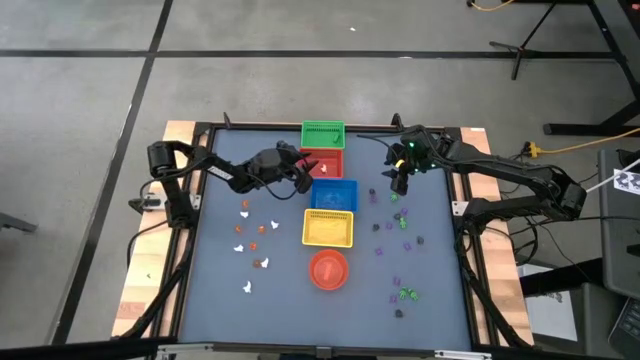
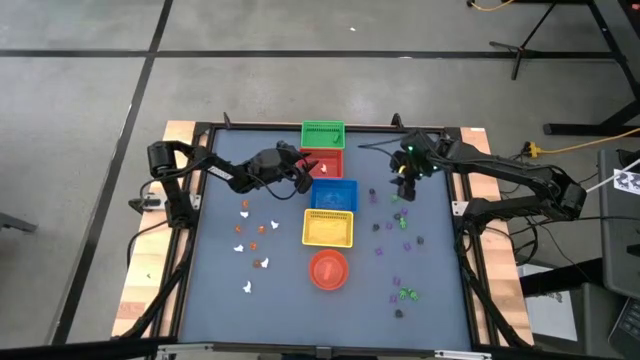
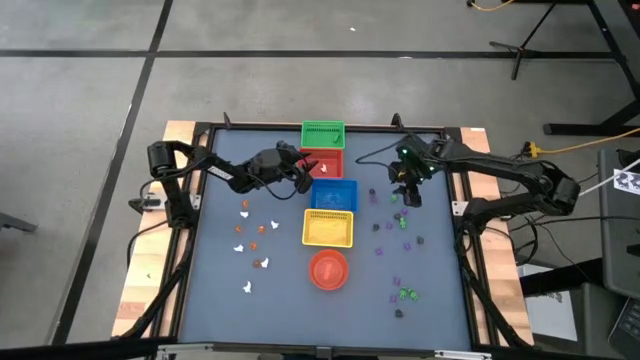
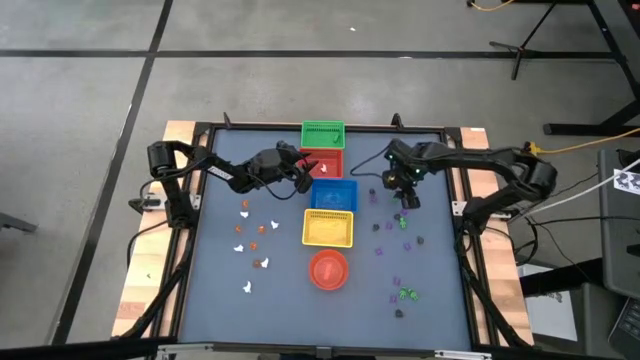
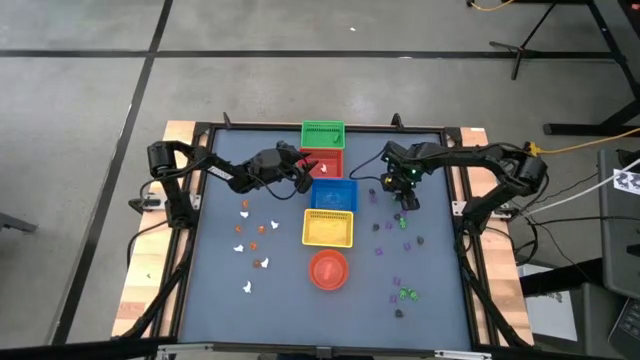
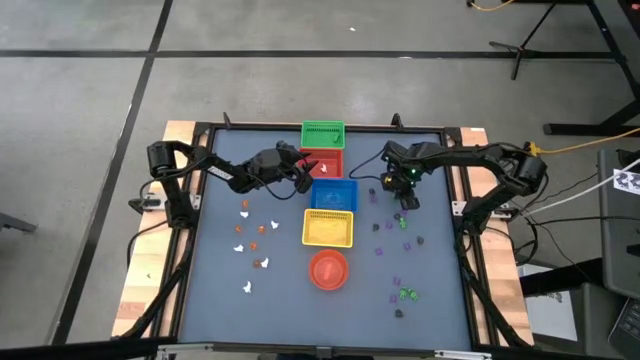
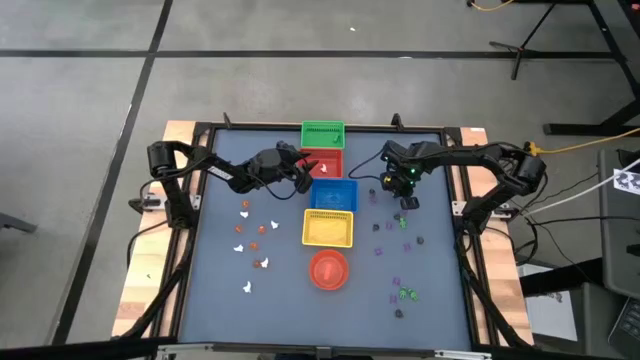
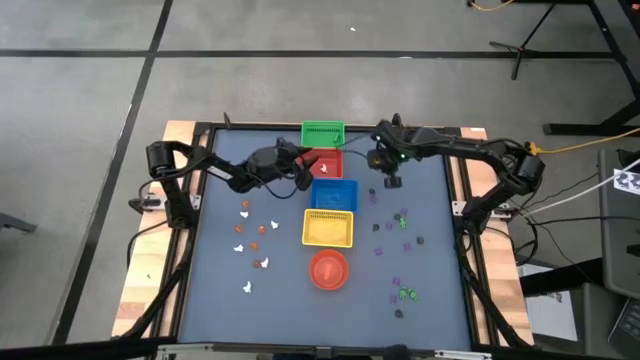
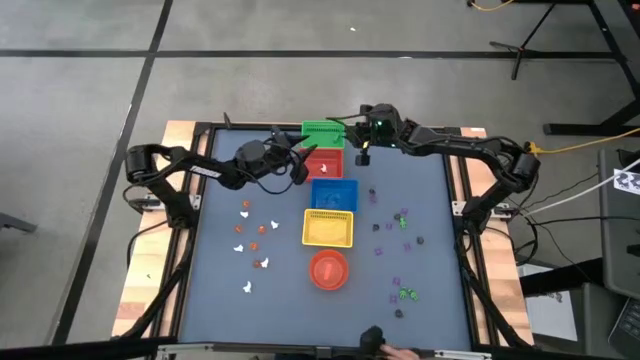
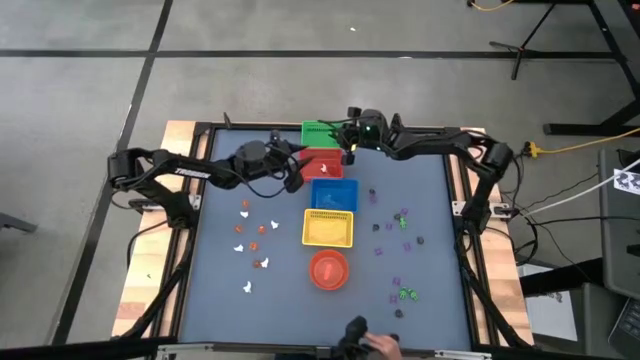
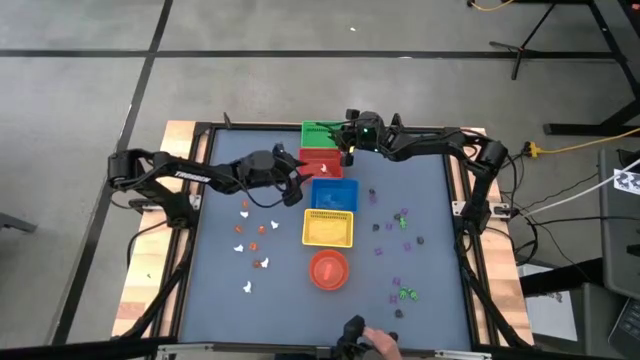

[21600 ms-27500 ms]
Task: Sort Halloween decoration
Put the green skeleton toy into the green bin

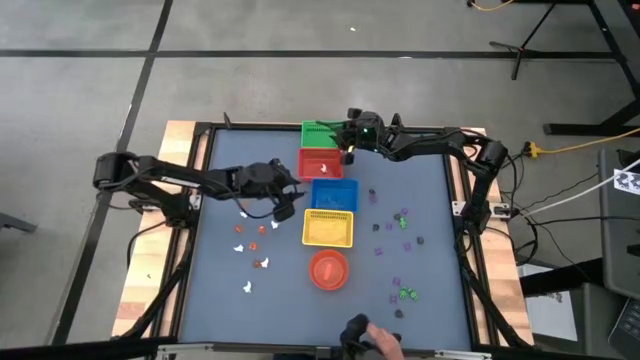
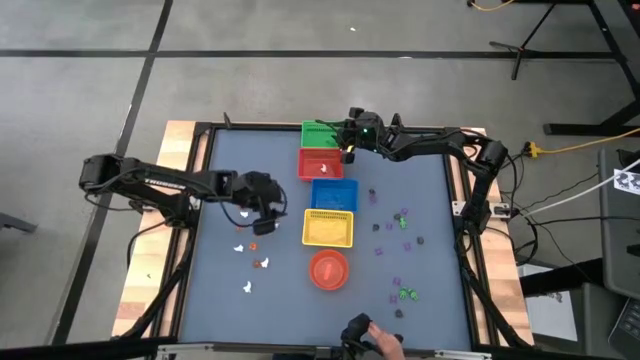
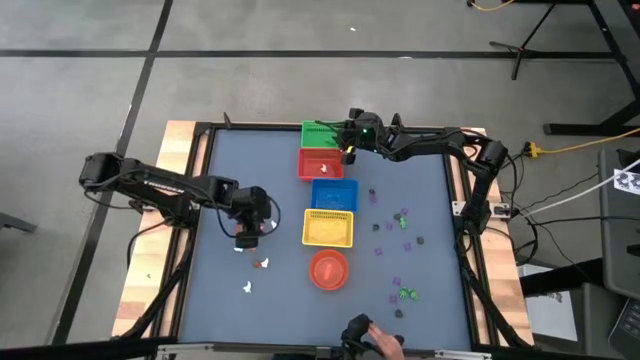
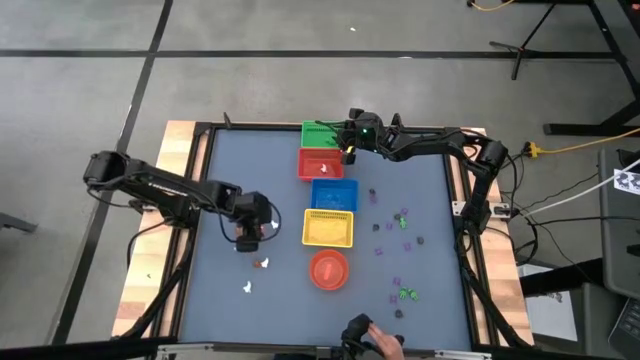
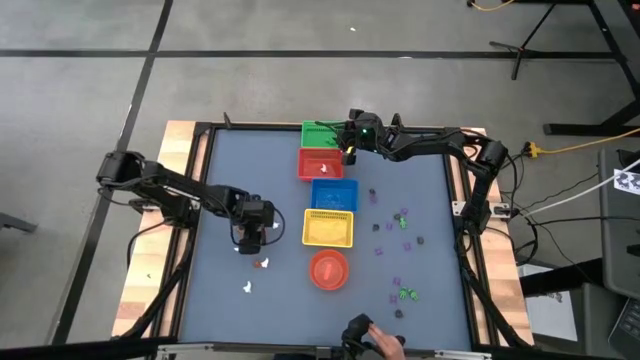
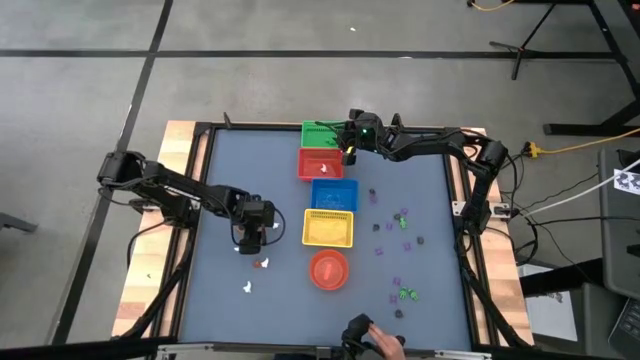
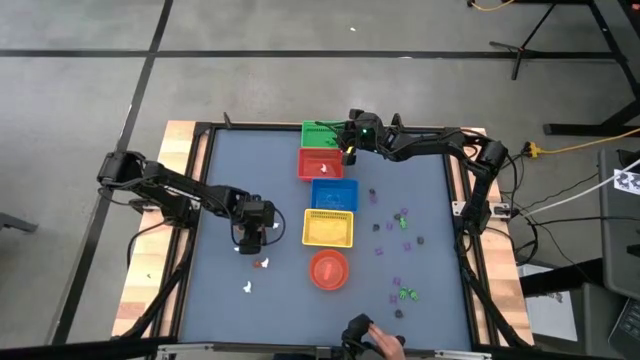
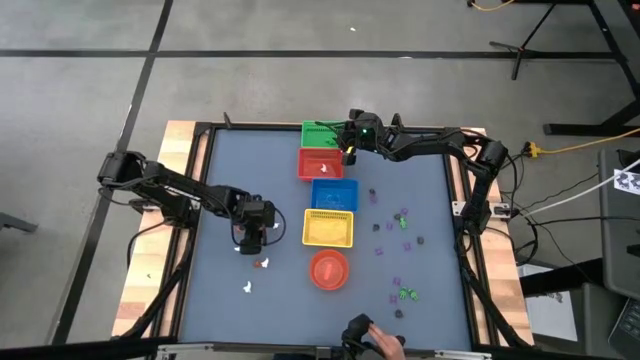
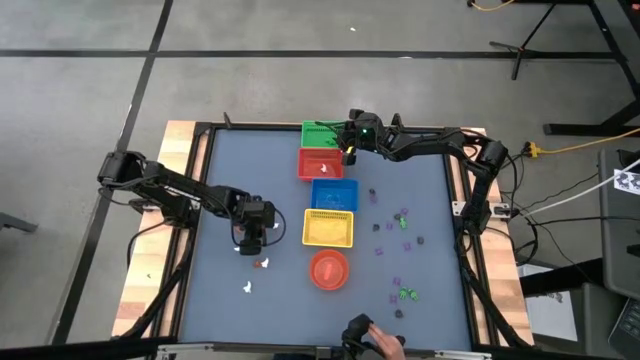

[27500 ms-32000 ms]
Put the orange pumpkin toy into the yellow bin

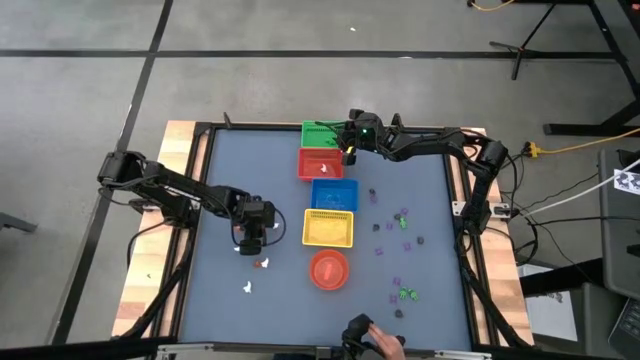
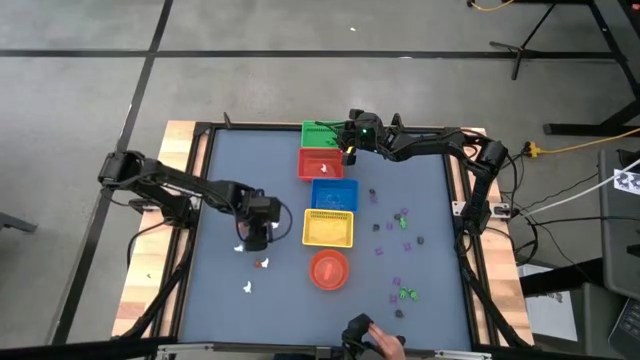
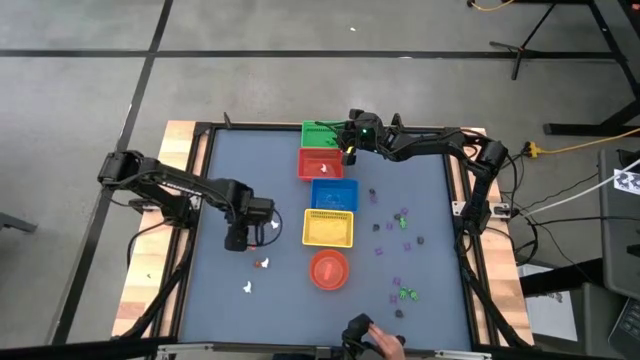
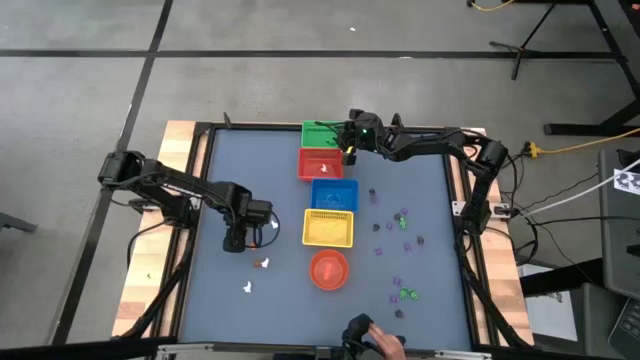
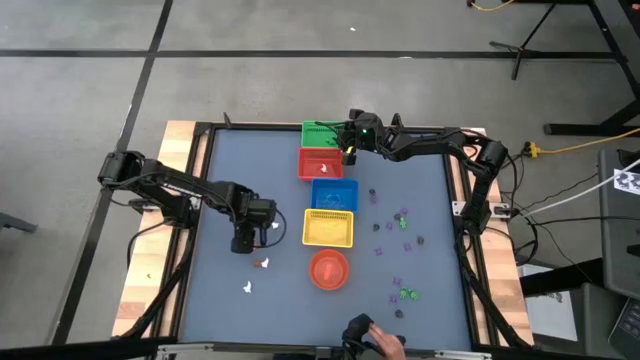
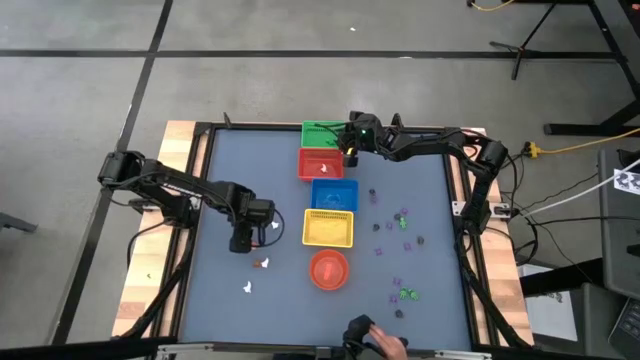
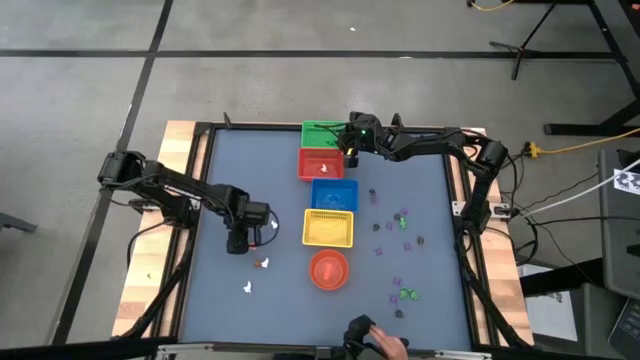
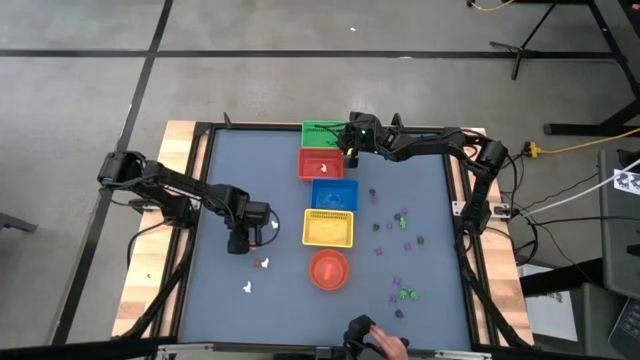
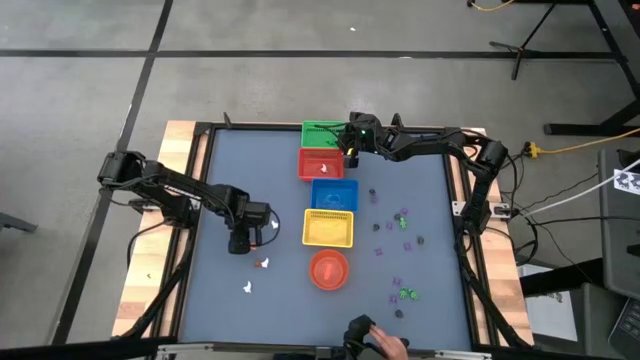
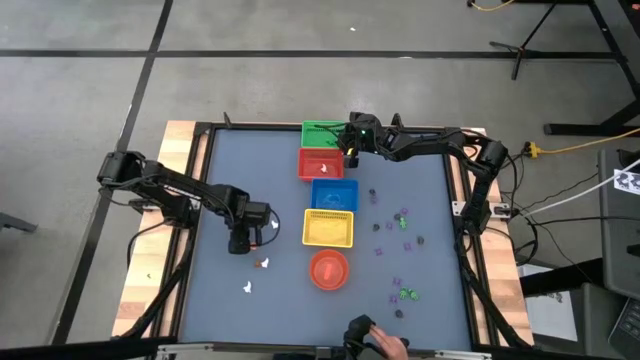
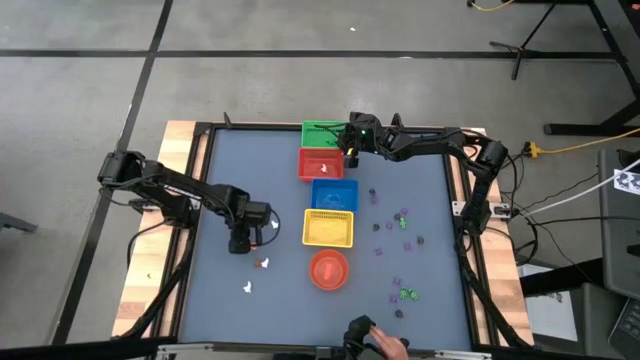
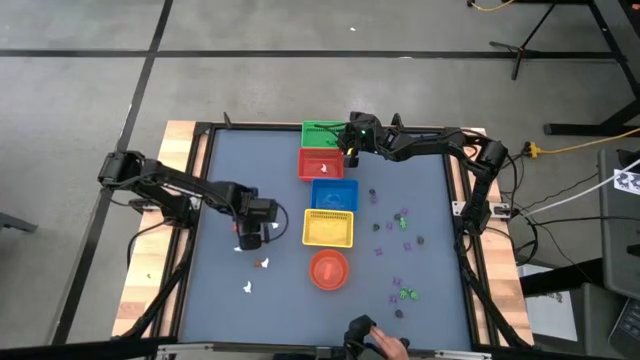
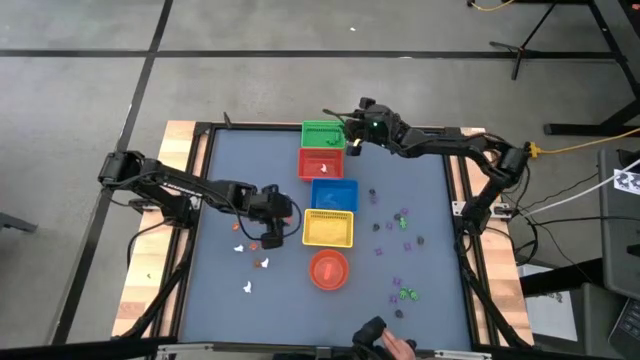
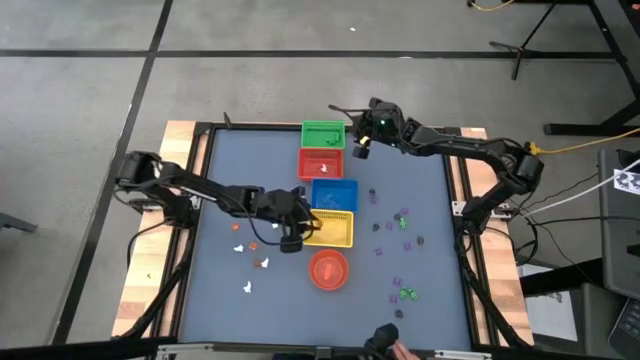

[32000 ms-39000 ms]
Put the orange pumpkin toy into the yellow bin

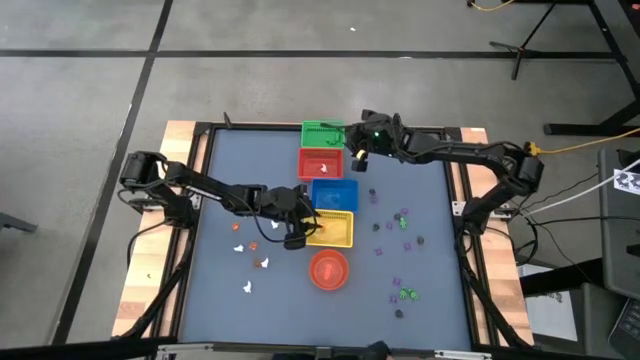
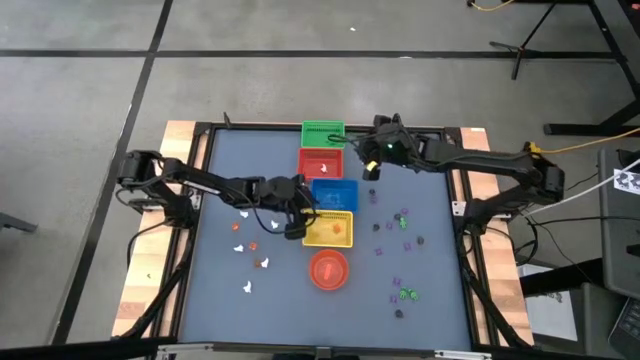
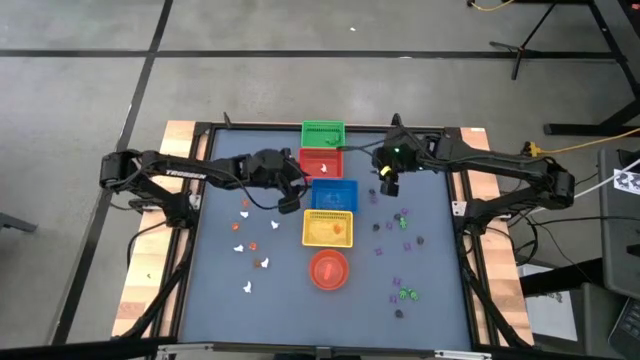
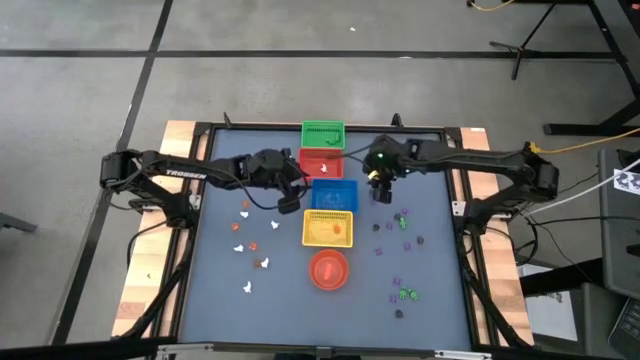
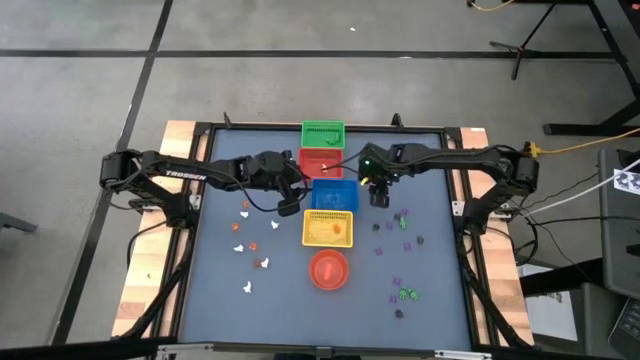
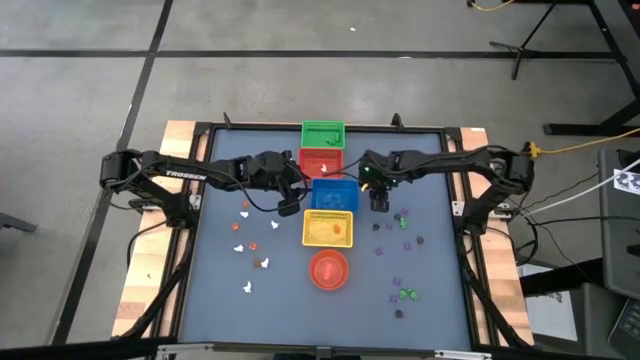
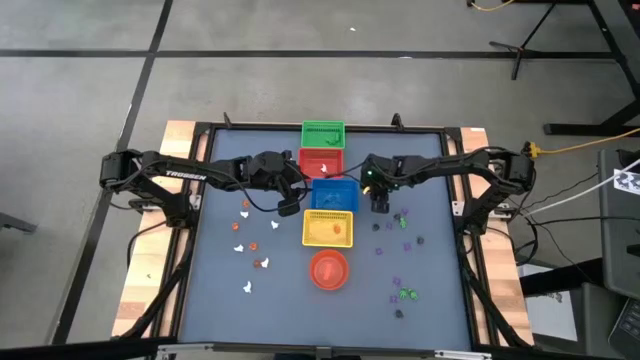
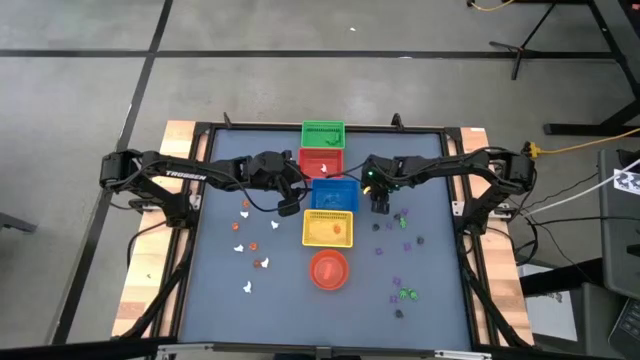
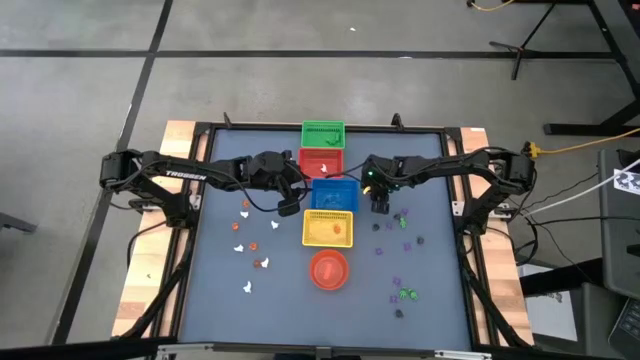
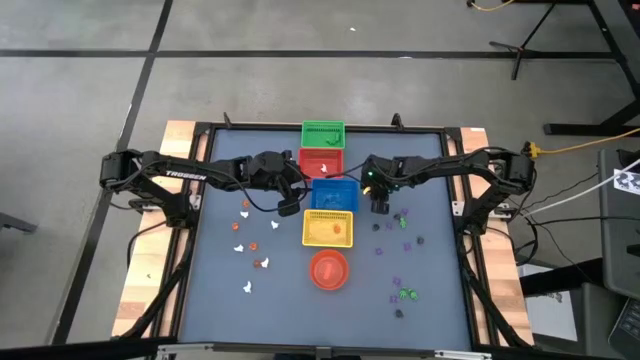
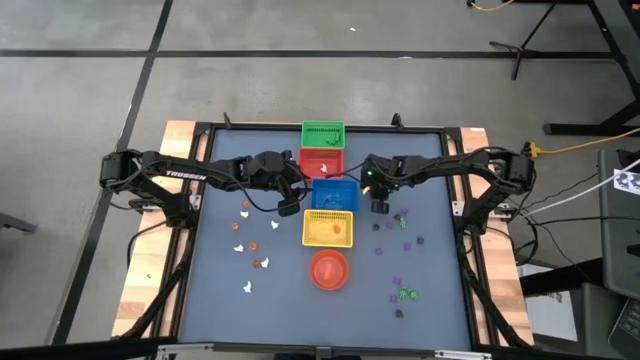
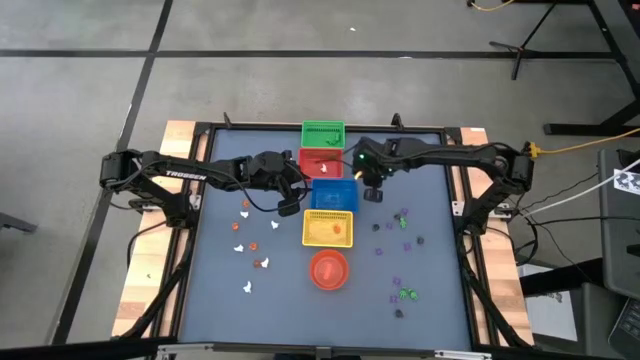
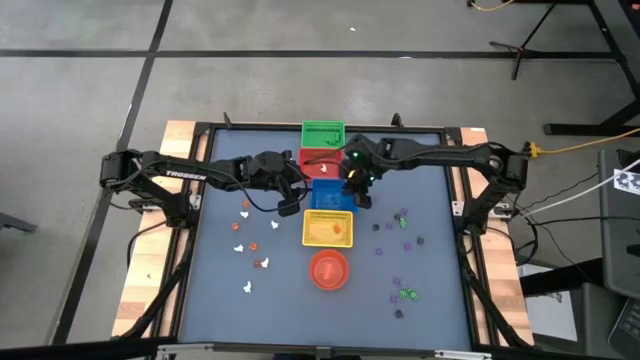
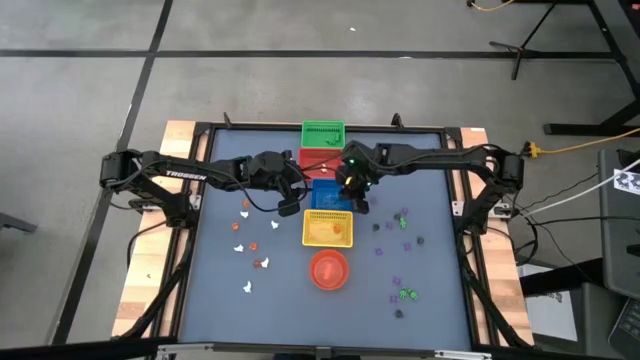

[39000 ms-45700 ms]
Put the black skull toy into the blue bin
